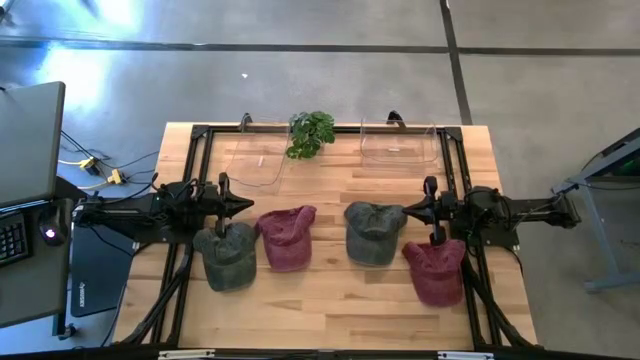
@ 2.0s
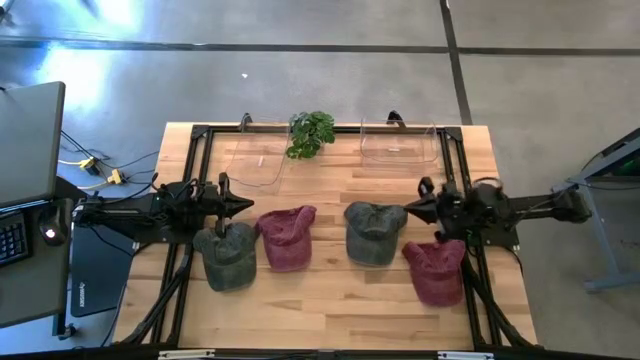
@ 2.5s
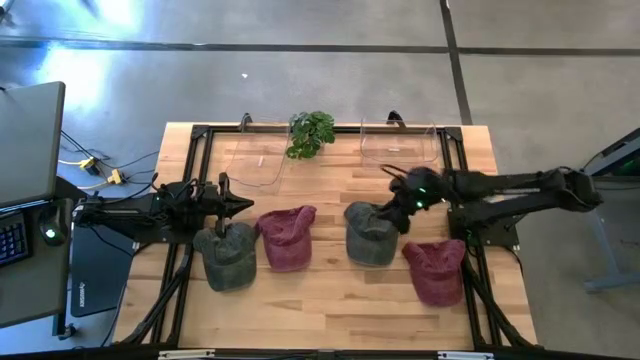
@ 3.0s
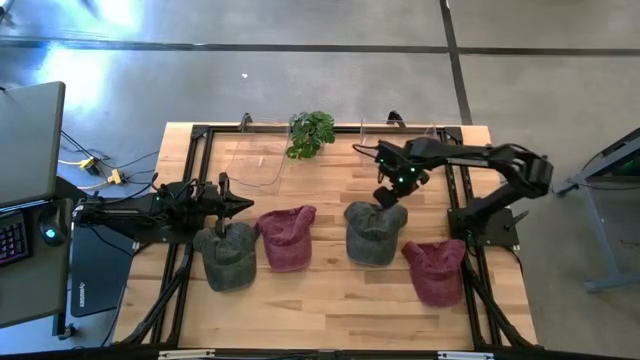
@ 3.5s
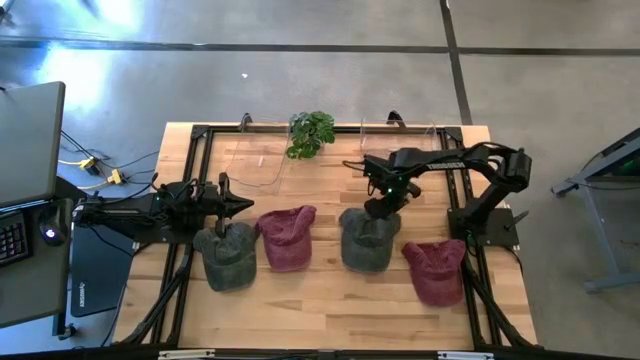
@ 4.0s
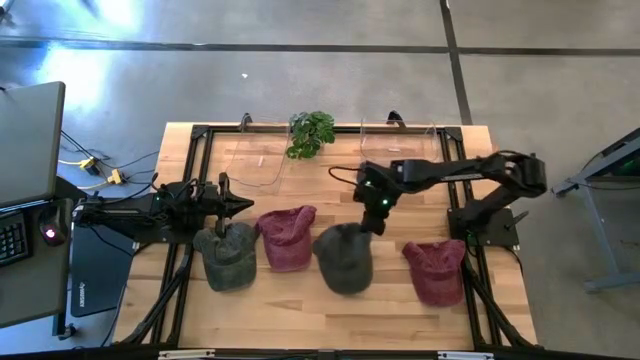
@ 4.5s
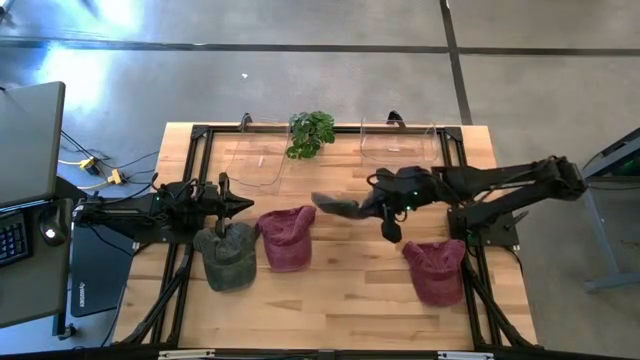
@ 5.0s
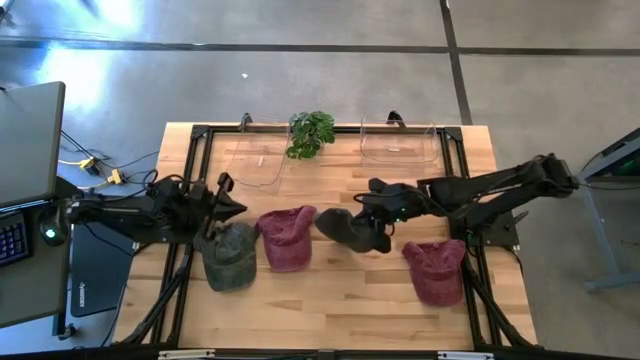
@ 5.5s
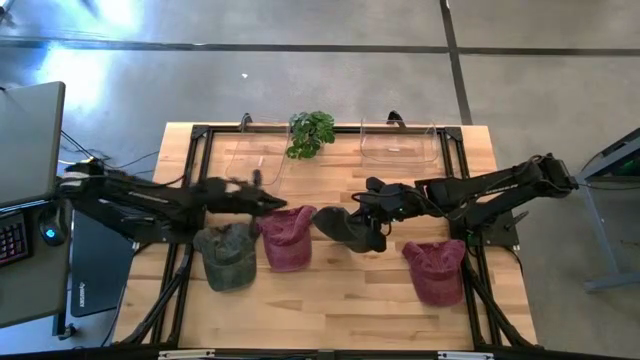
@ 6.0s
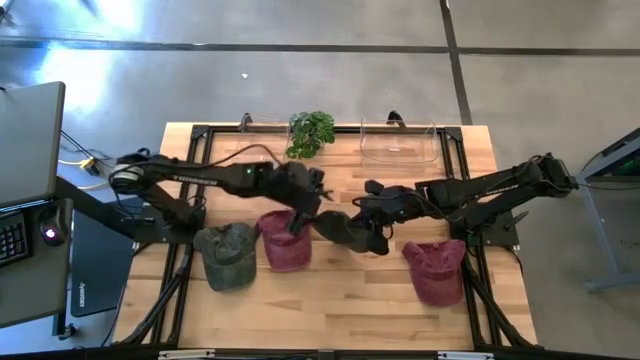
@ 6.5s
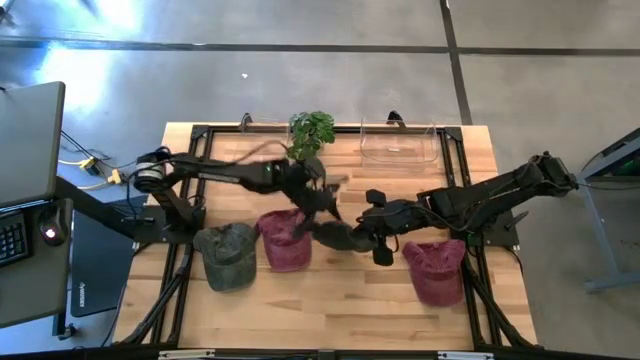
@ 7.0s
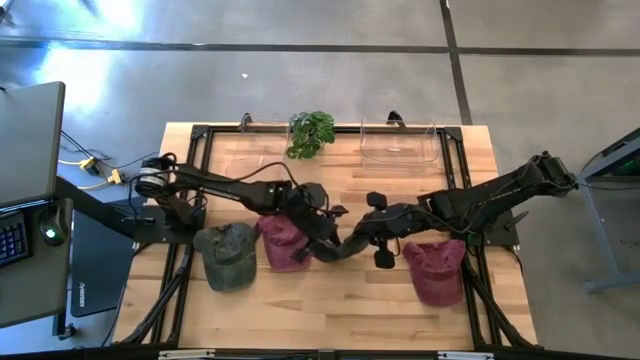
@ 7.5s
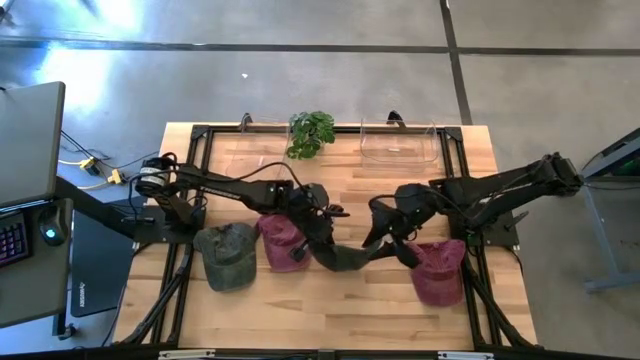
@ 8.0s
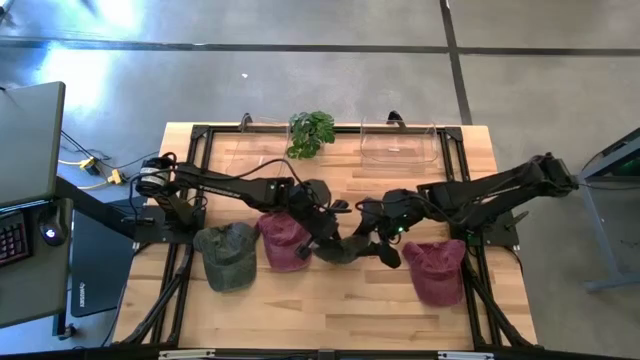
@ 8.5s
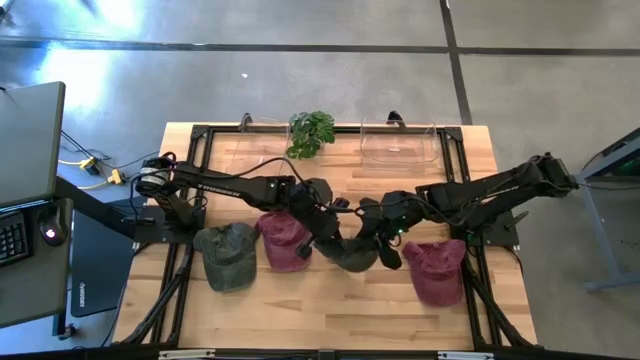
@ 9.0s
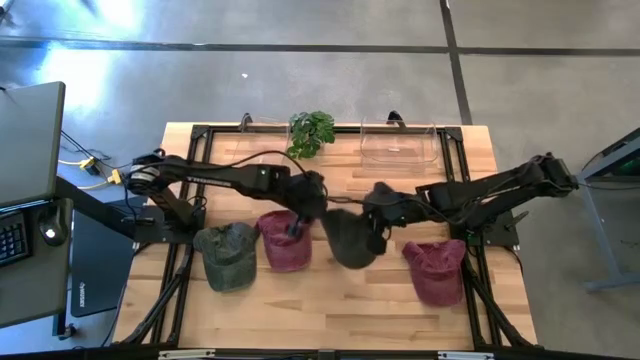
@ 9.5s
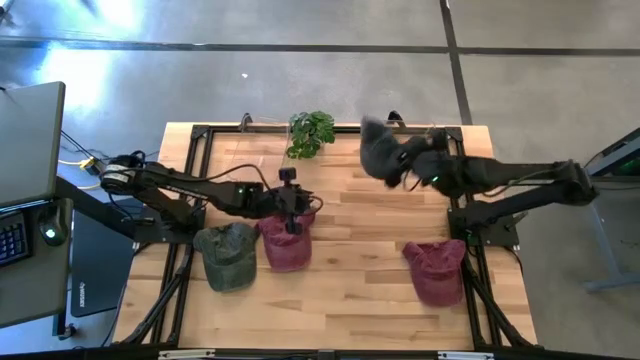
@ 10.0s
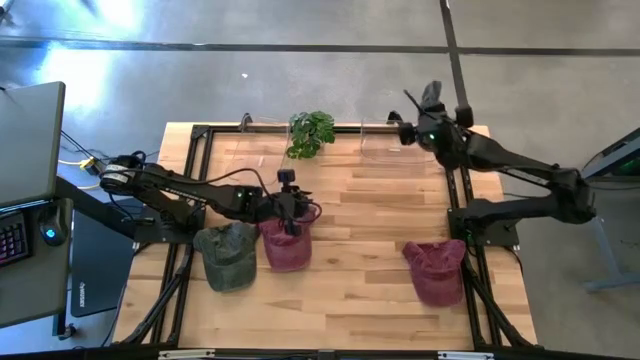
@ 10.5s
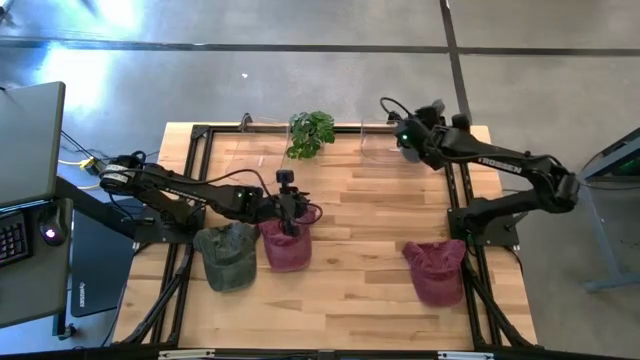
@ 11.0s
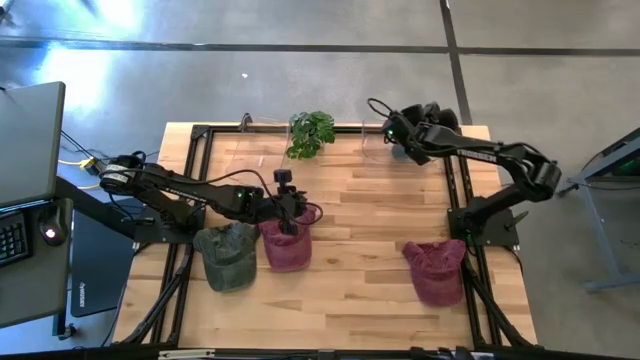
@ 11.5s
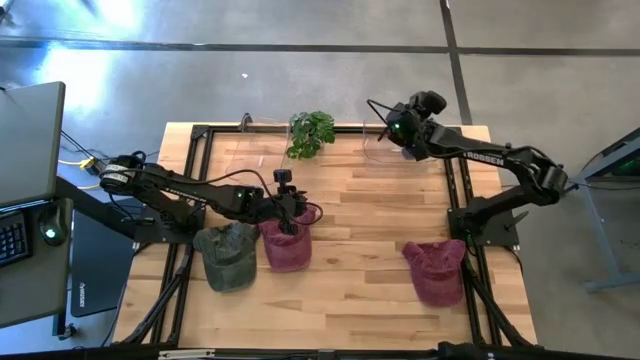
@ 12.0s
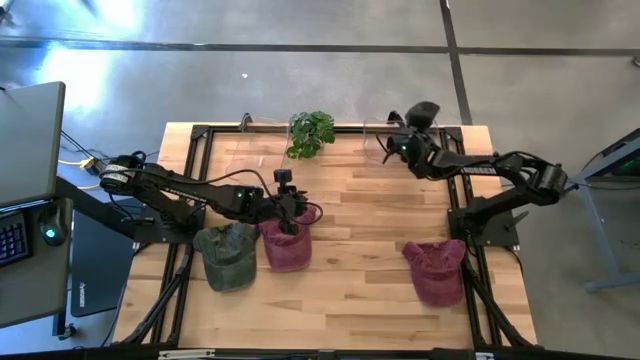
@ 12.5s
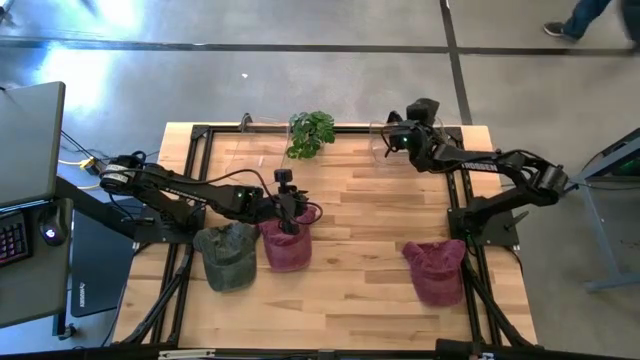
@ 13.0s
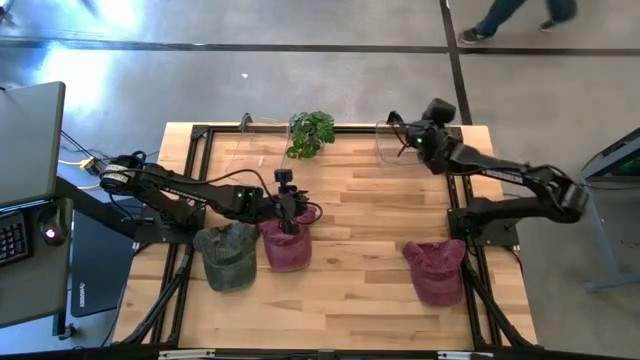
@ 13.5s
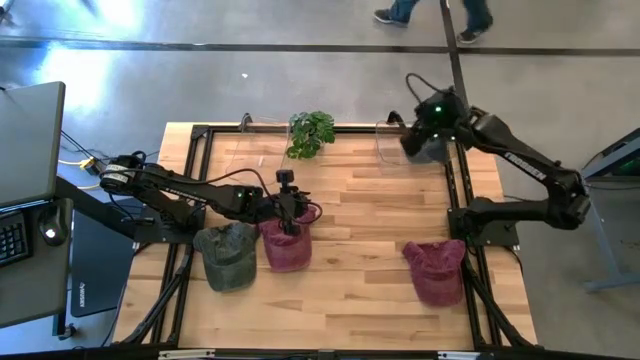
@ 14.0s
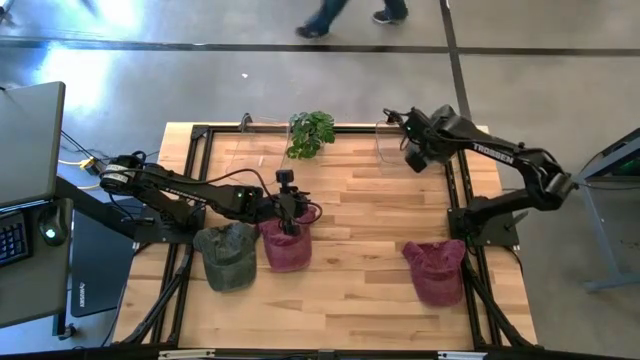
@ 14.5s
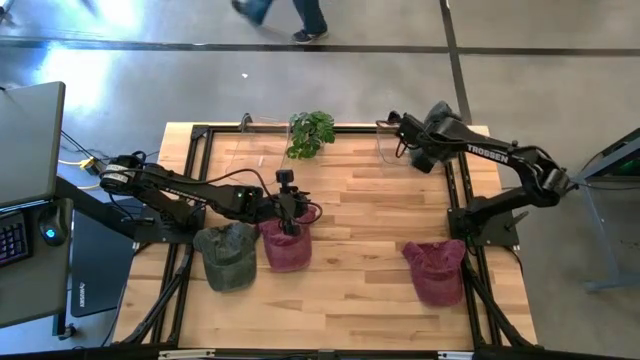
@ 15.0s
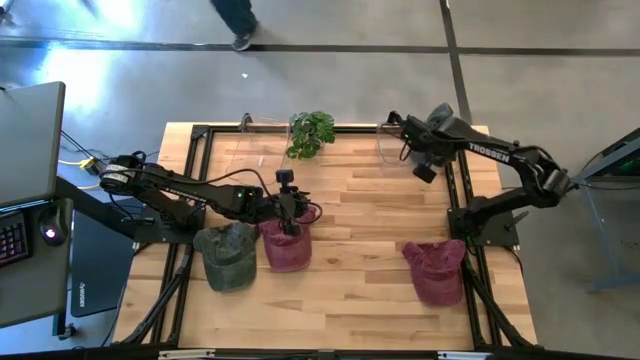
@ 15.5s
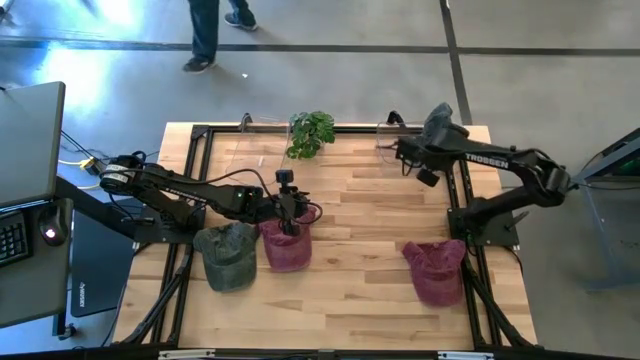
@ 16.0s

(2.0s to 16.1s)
Task: Pick & Place hat
Put the right black cap into the right transparent bin

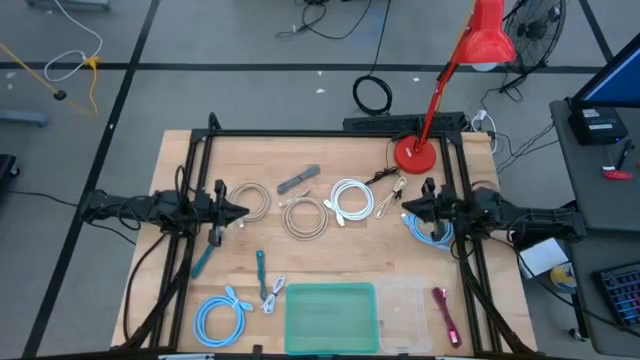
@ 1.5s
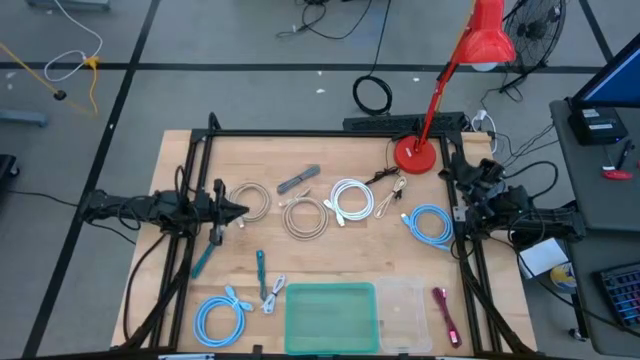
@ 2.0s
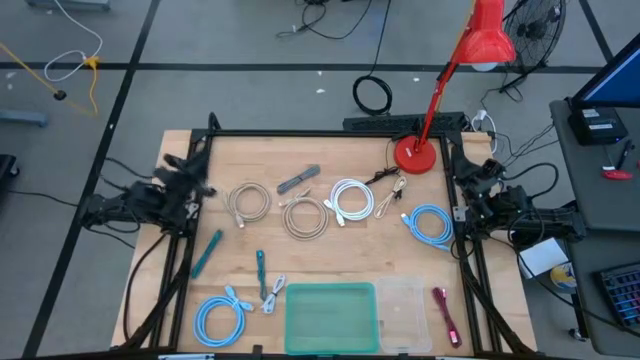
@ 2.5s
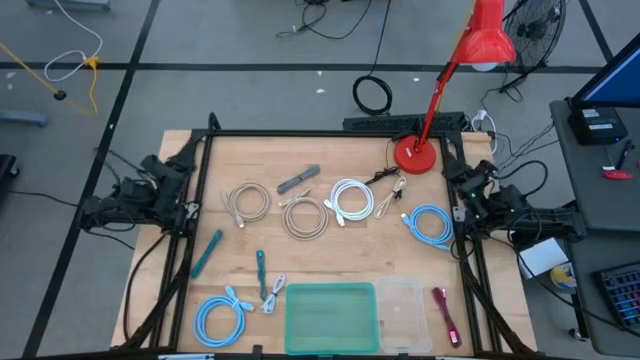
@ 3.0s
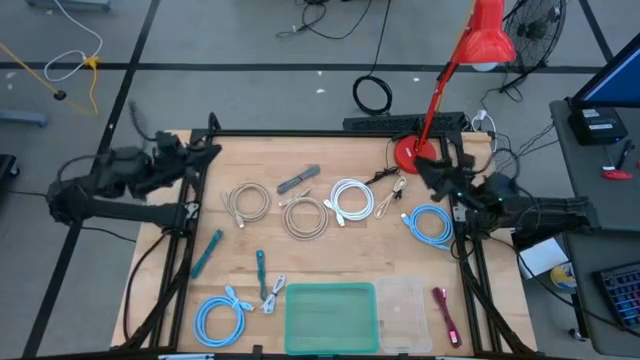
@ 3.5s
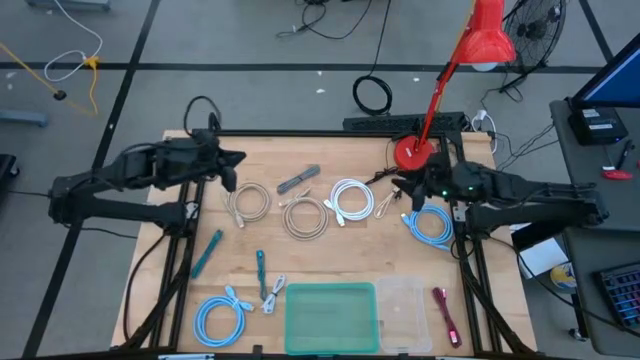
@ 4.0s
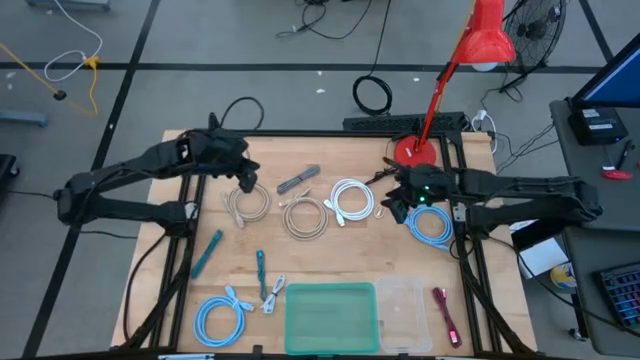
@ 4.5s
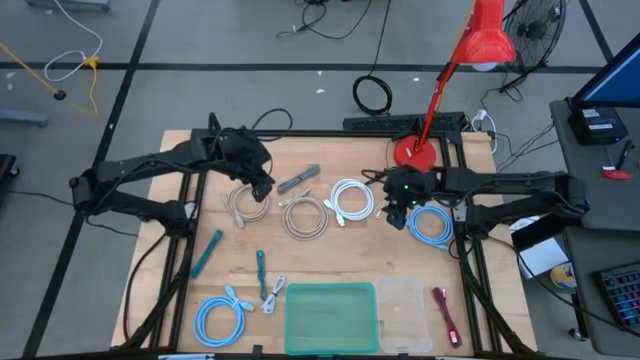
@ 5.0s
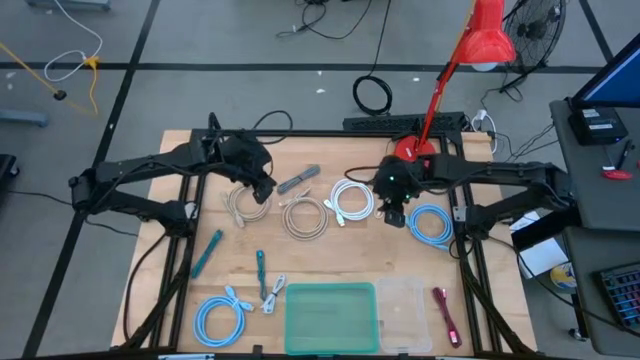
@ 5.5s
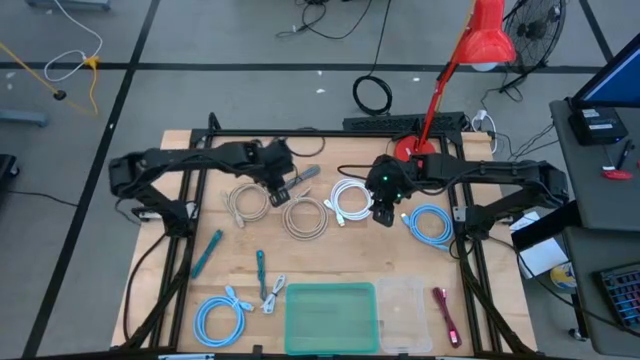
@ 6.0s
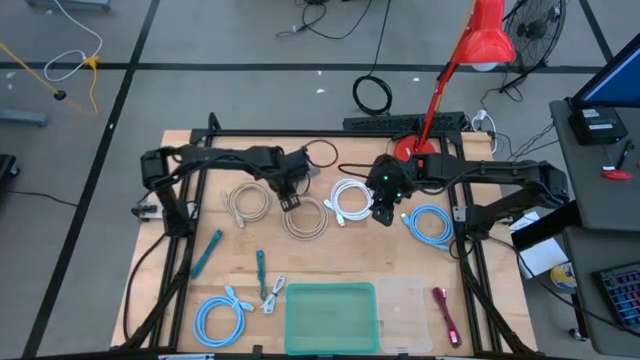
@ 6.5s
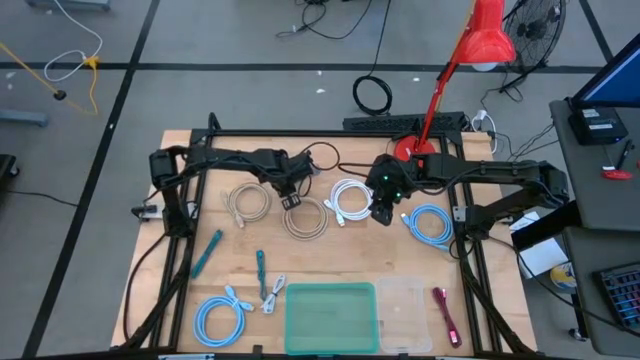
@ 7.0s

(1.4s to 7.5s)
Task: Pick & Place USB Port
Put the black charger cable into the white transparent bin
